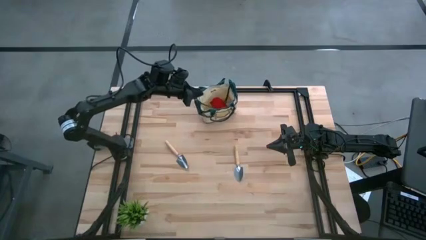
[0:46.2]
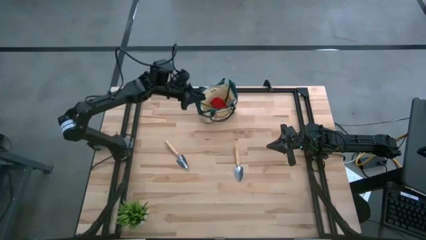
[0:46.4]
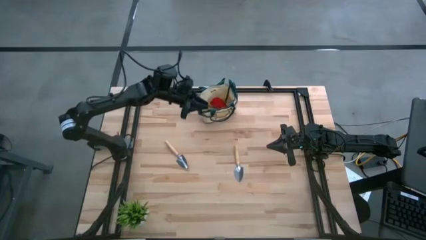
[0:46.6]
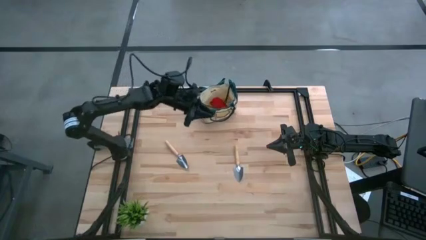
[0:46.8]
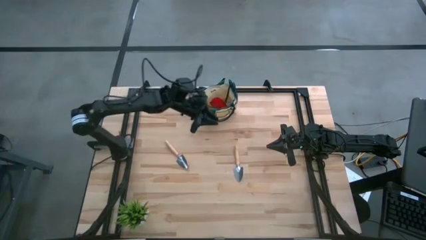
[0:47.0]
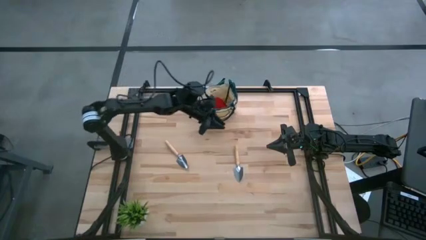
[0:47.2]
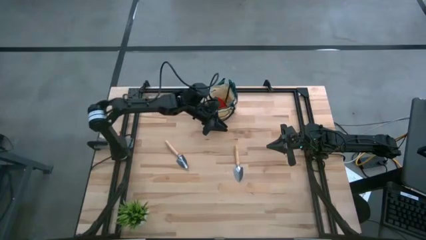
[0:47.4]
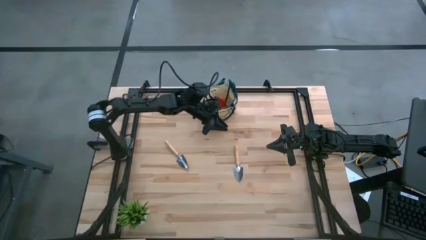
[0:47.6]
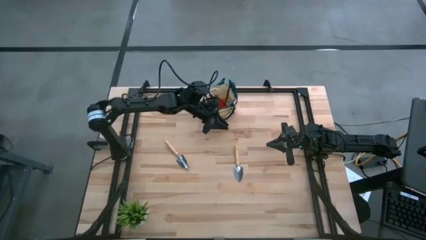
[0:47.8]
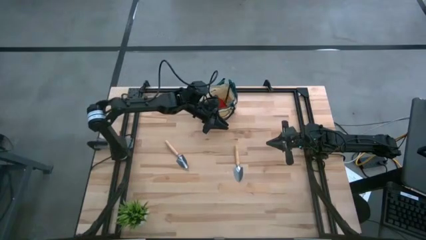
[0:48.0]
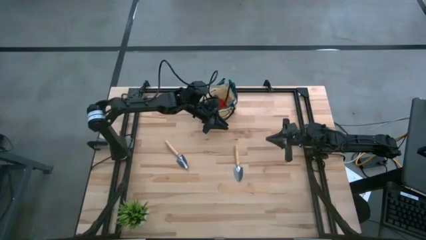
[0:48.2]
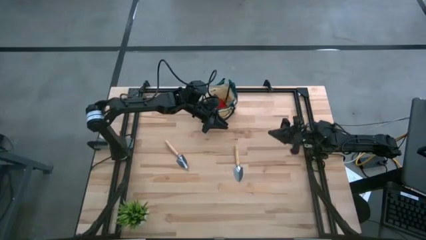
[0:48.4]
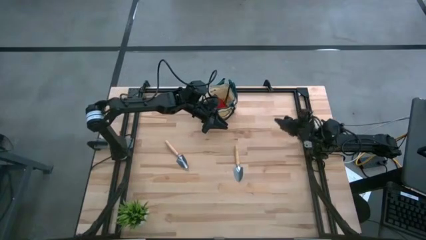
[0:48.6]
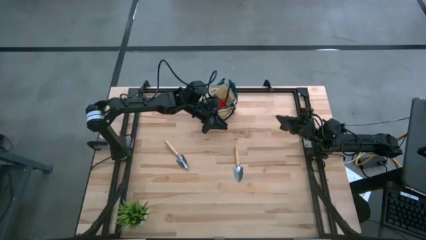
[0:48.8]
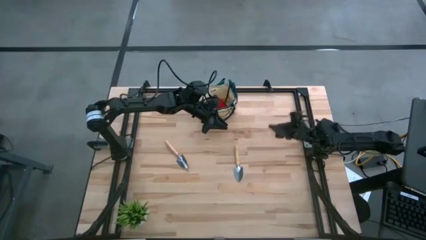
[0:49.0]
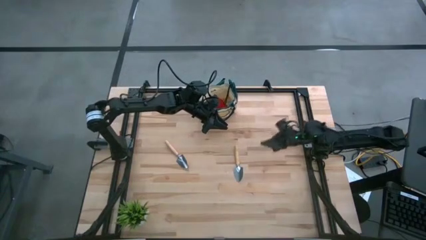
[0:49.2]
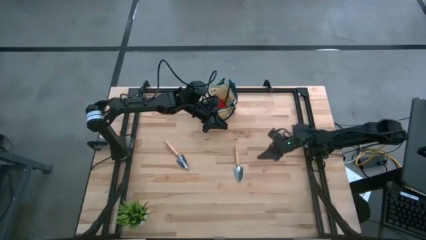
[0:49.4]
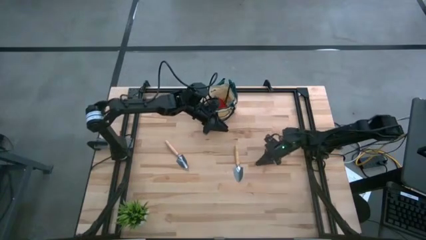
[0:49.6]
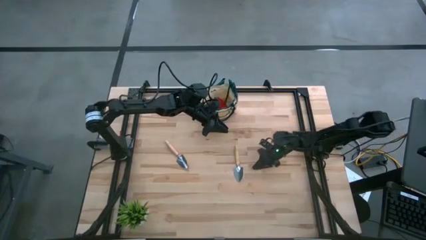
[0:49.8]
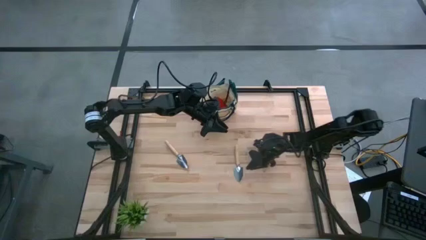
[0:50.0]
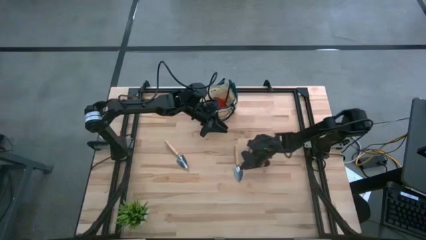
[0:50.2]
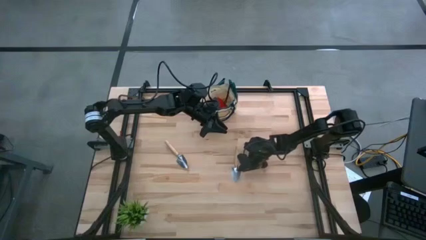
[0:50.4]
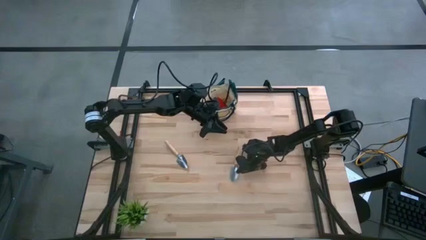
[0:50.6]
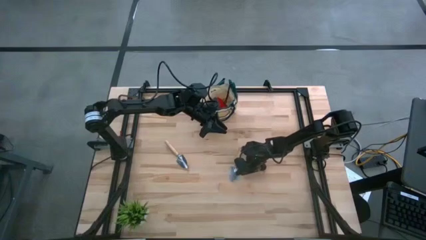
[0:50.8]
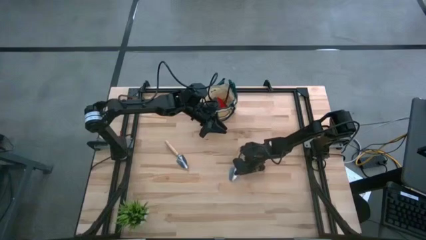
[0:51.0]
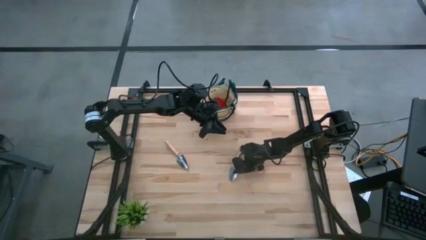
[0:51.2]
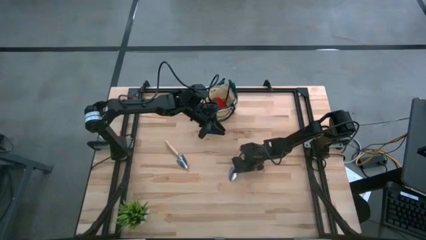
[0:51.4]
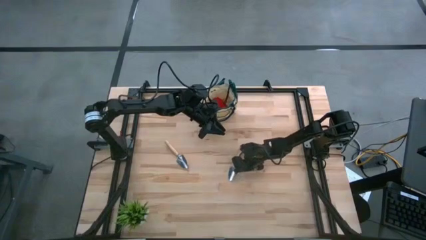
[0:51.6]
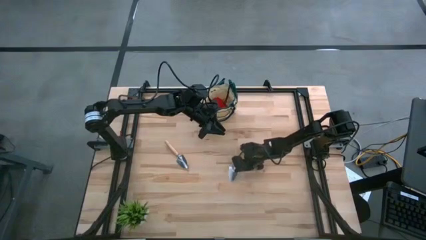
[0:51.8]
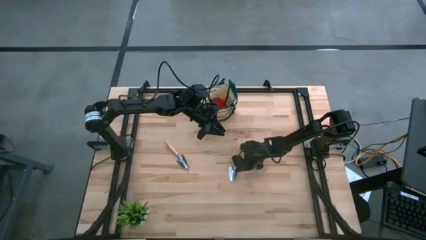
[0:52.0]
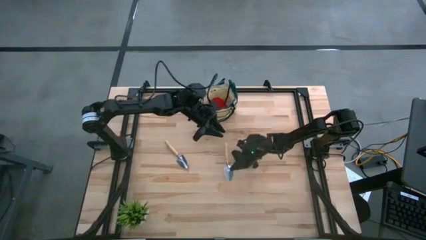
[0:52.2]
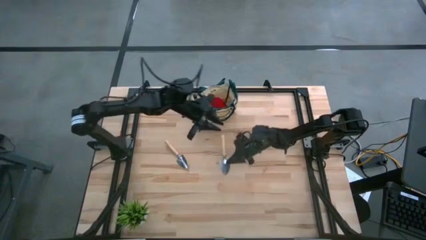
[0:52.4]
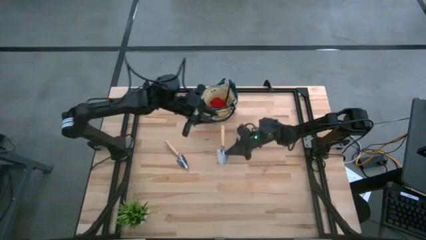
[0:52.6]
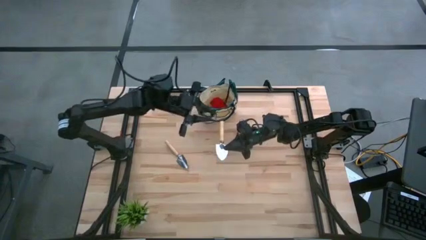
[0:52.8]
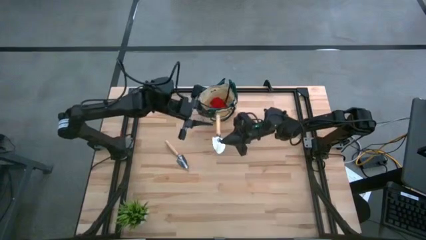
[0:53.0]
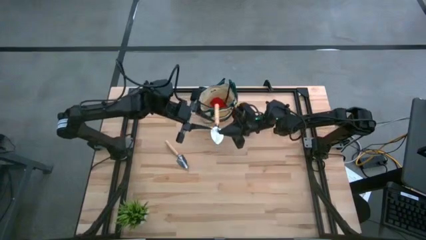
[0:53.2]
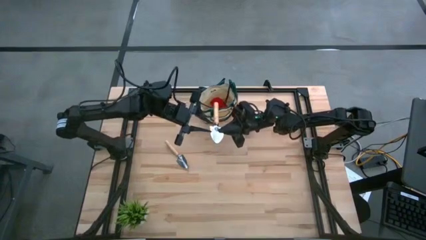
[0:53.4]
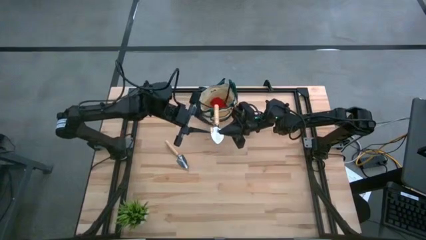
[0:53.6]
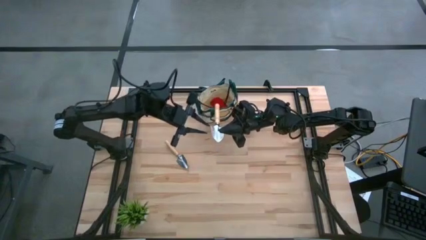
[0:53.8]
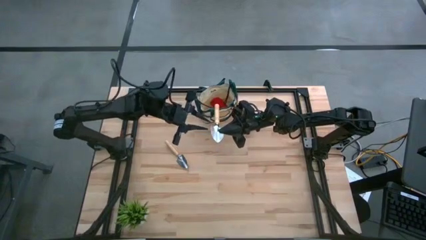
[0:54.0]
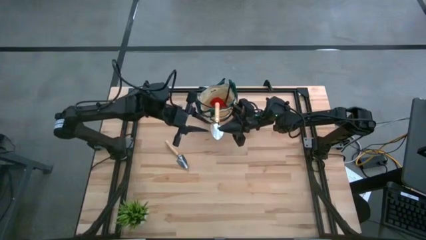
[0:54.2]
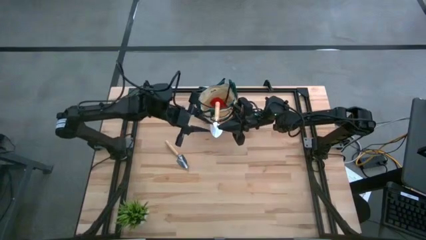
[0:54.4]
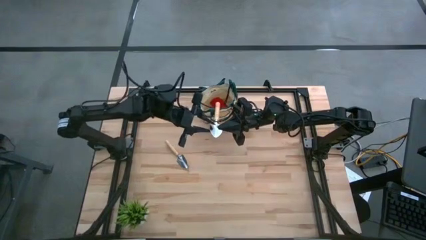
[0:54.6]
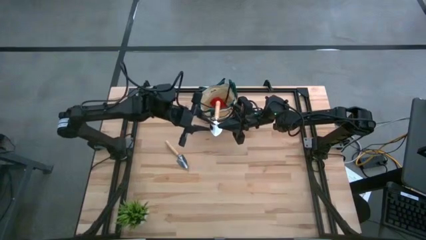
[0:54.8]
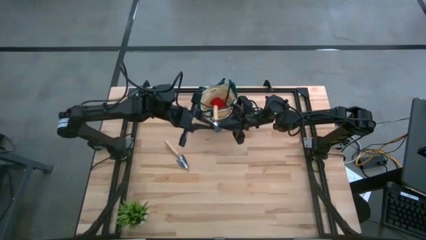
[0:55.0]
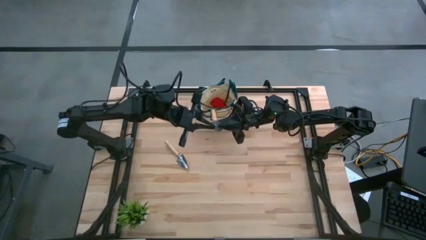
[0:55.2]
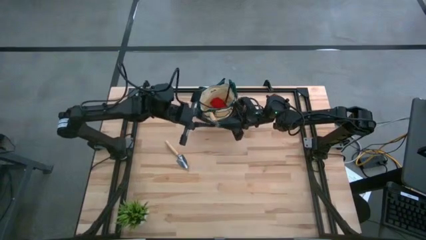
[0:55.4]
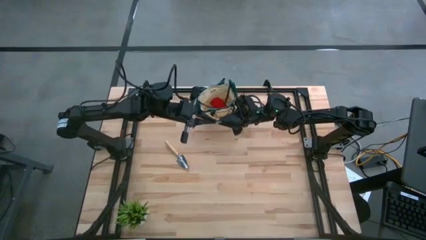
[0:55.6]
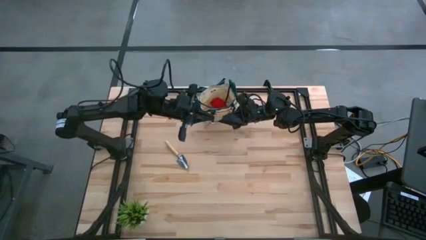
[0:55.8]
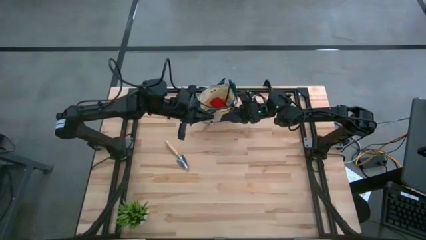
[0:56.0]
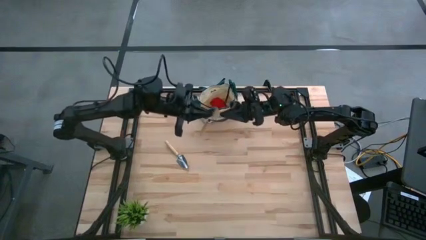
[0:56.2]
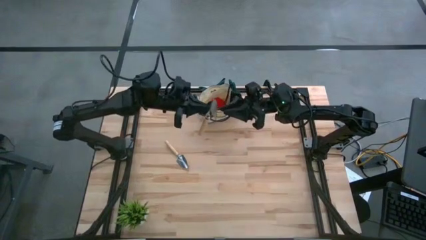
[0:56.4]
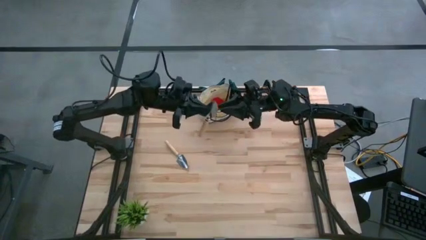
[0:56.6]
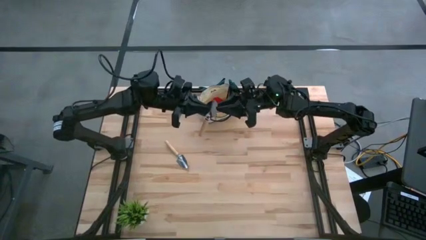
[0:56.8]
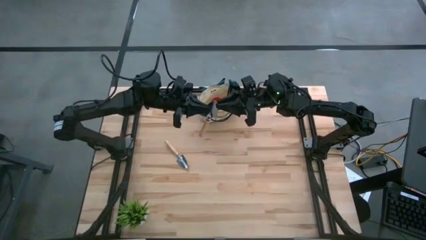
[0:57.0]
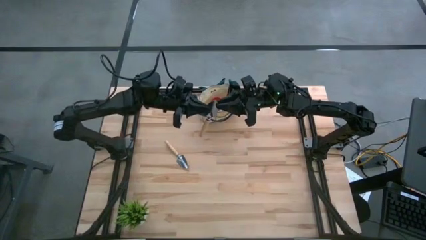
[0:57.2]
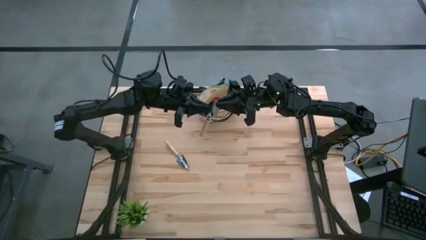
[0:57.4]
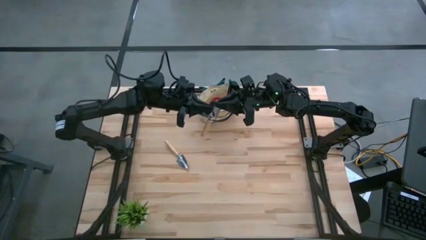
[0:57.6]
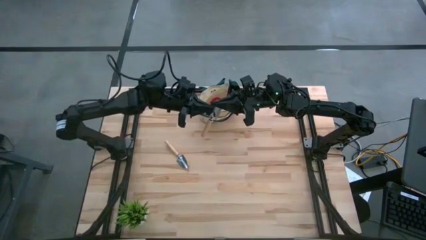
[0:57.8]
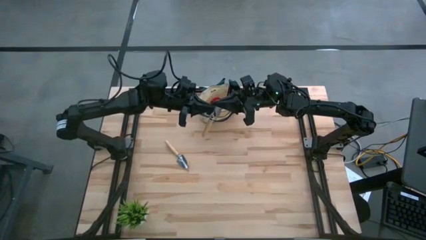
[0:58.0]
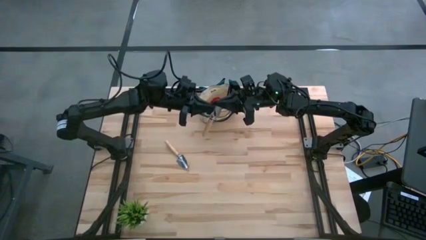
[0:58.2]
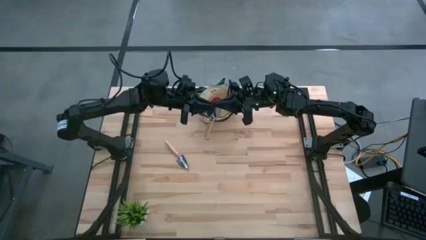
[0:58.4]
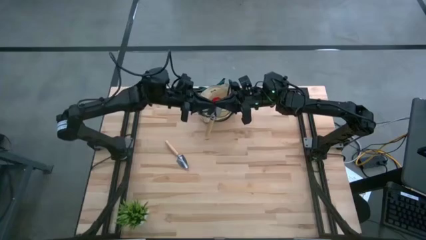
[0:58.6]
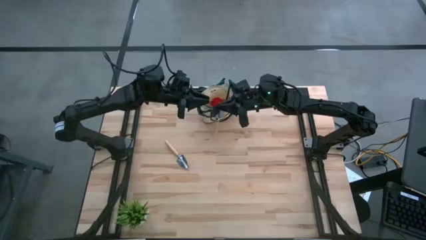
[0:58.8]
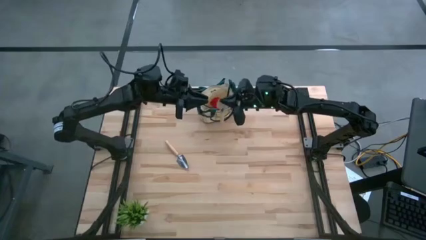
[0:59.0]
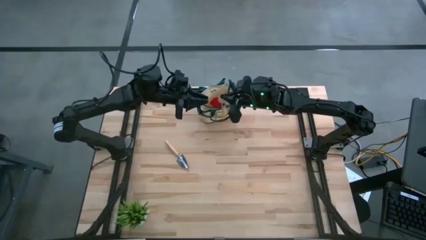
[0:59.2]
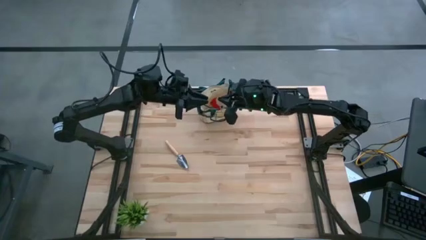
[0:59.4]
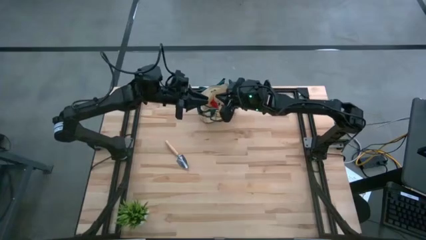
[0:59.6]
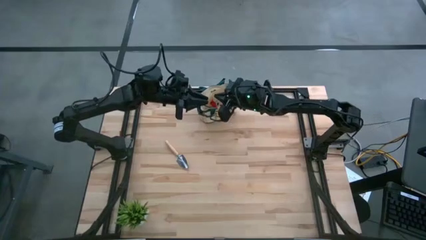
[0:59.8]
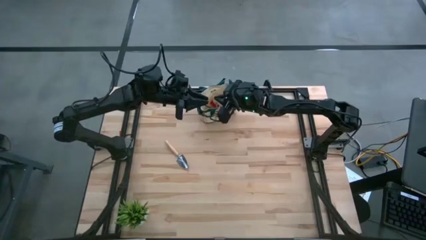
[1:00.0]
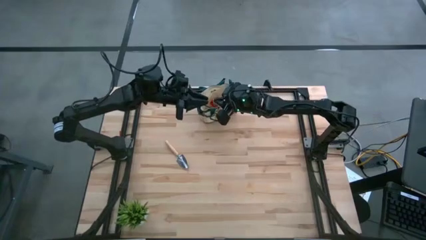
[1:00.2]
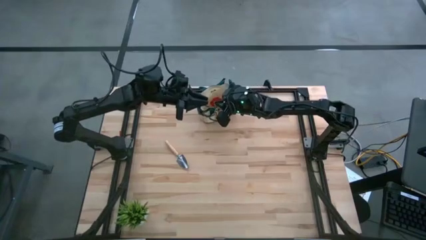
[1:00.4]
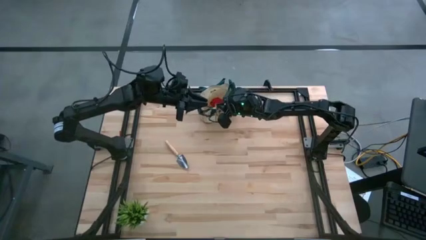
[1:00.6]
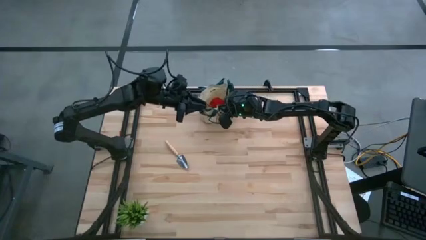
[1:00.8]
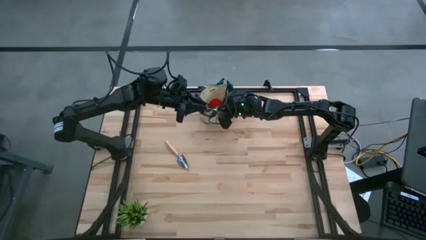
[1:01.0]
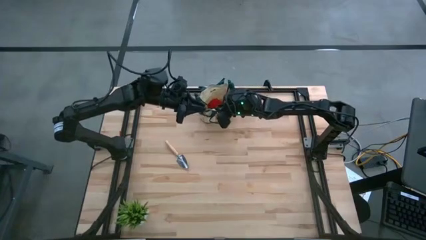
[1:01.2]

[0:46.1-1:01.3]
Task: Pick & Place Garden tools in Gardening bag
Put the right trowel into the gardening bag
